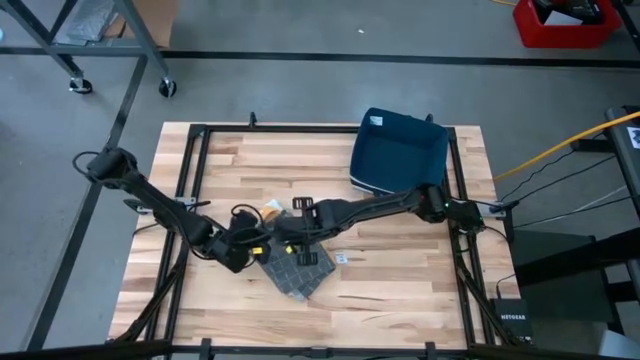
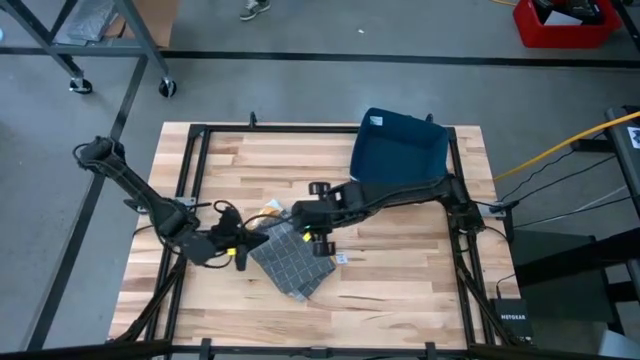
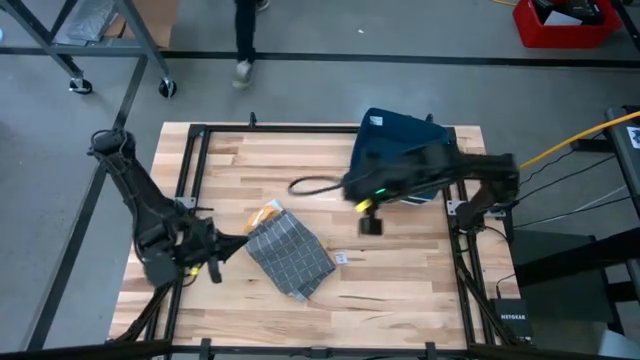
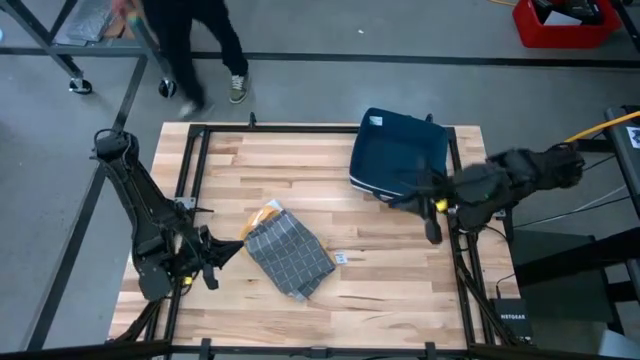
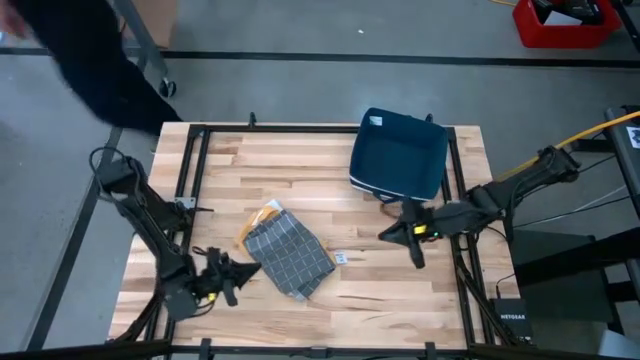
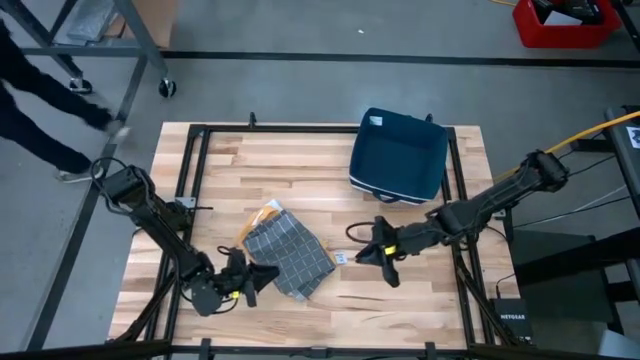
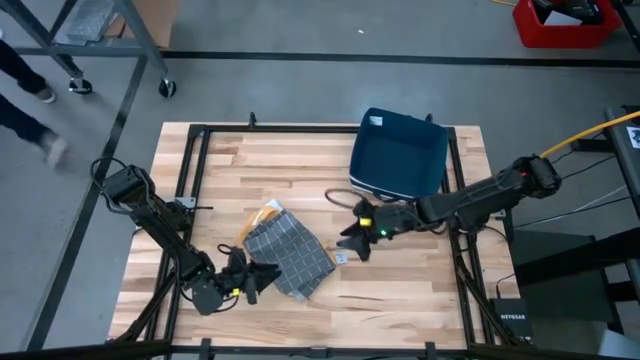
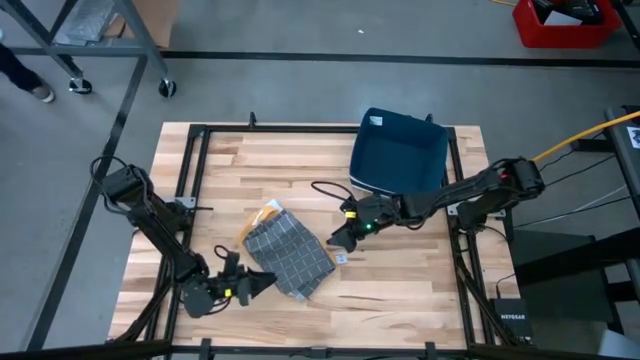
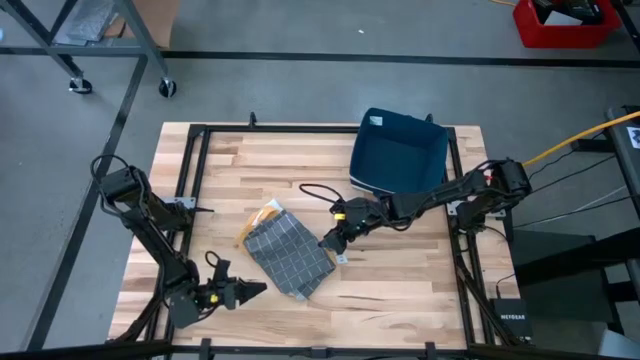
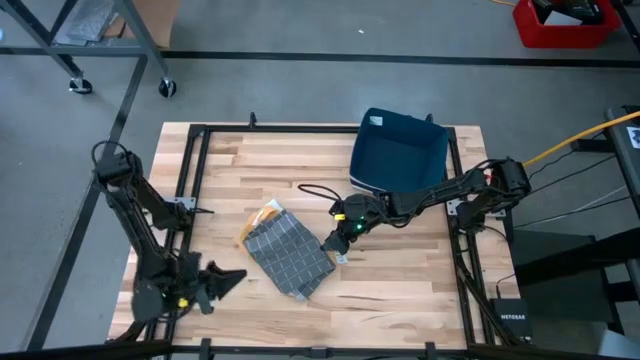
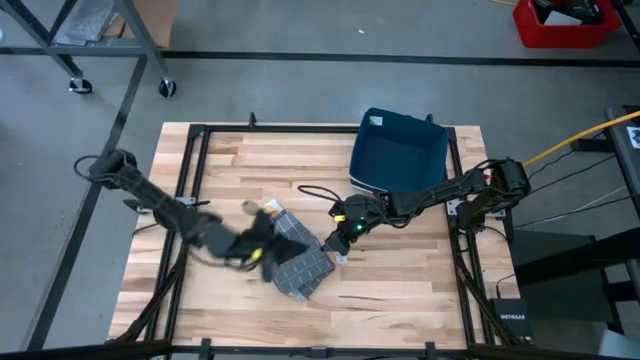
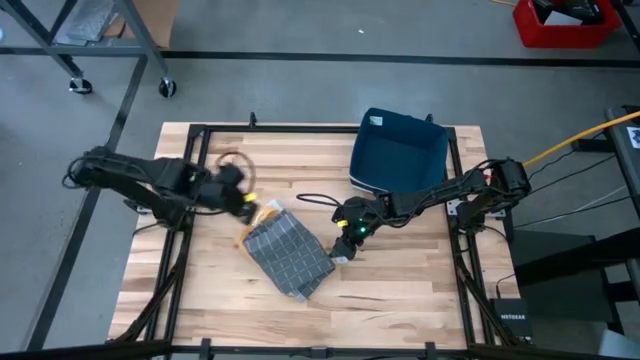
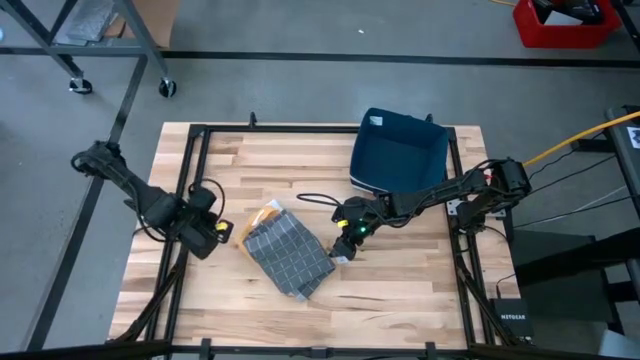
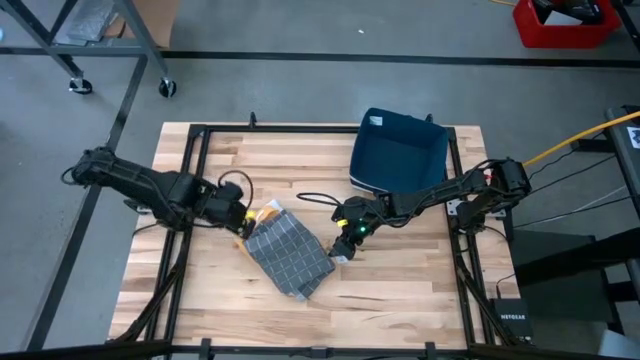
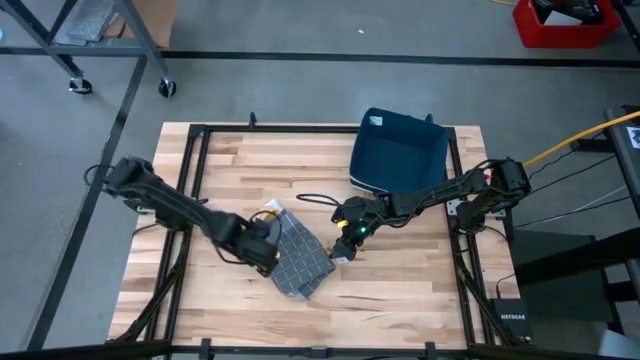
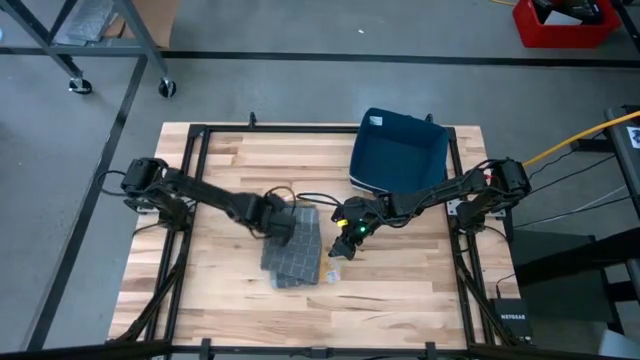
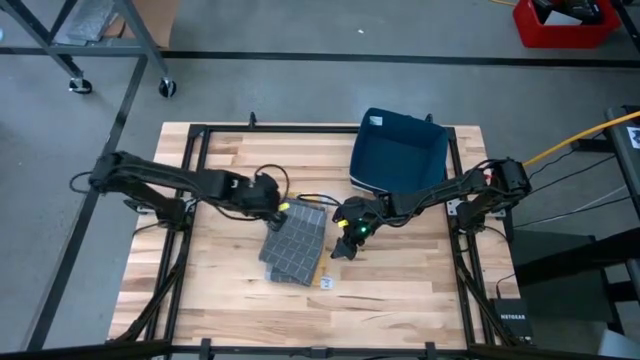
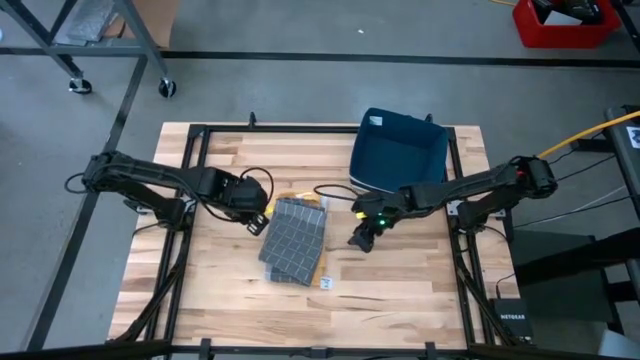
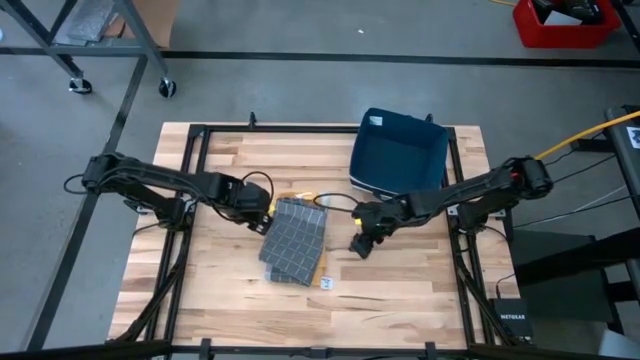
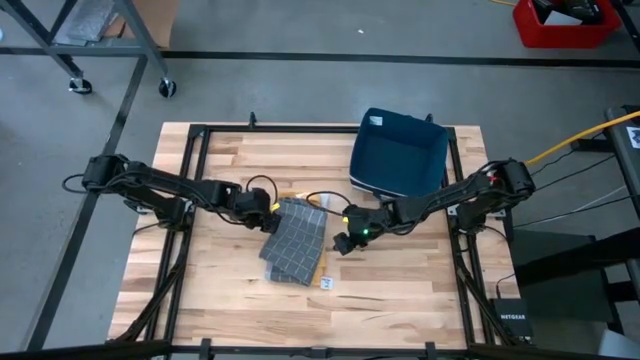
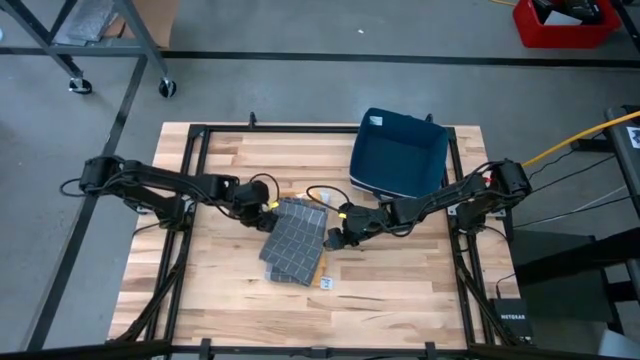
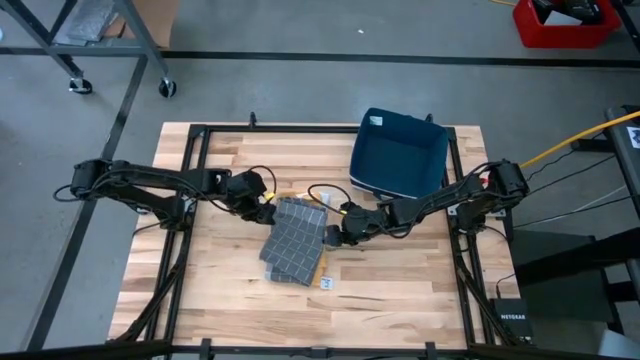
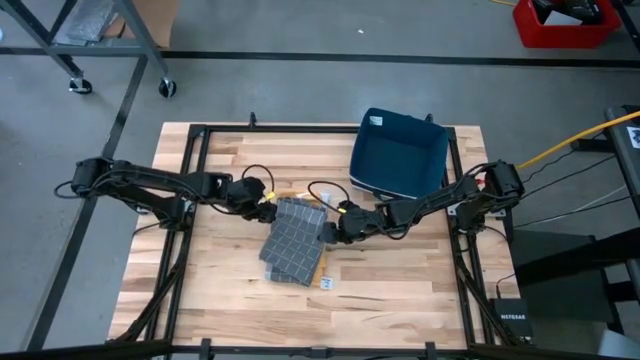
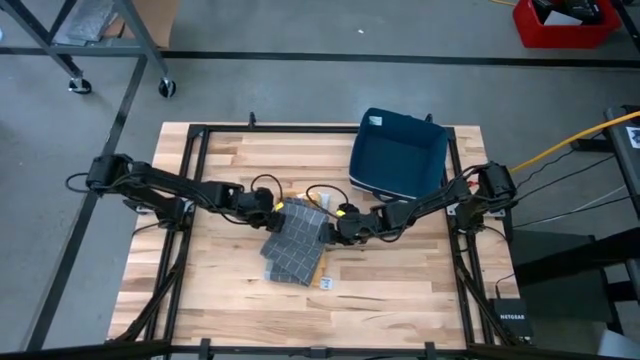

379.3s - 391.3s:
Task: Fold towel
Put the stacked and folded towels into the blue laundry bin

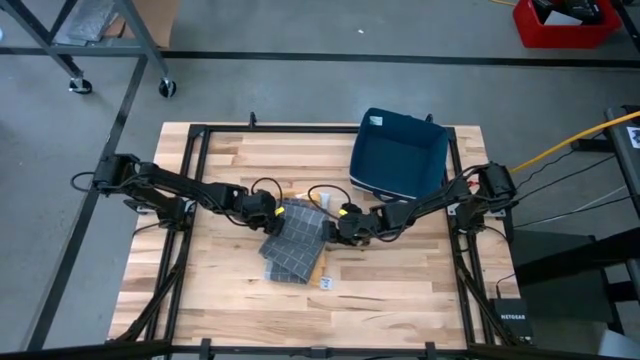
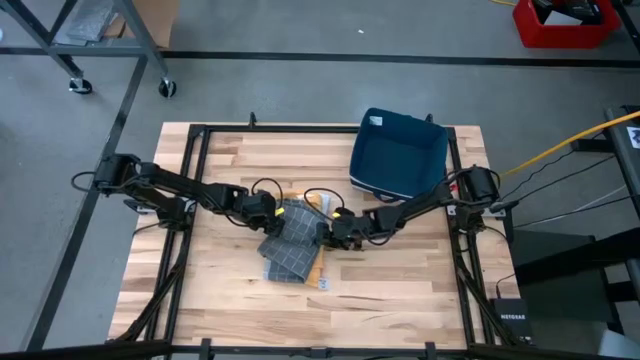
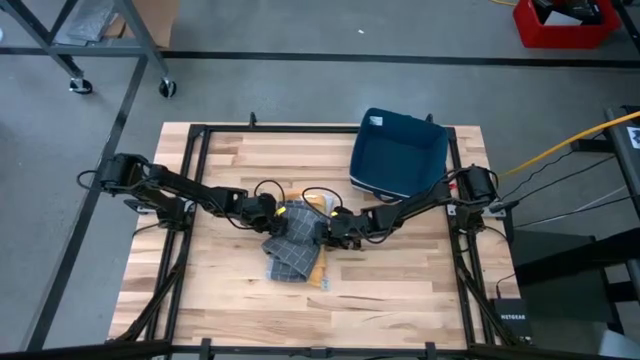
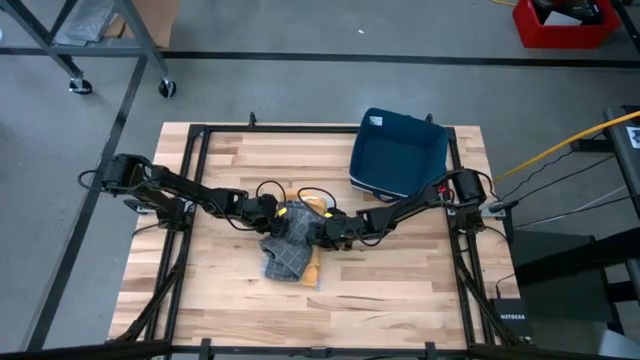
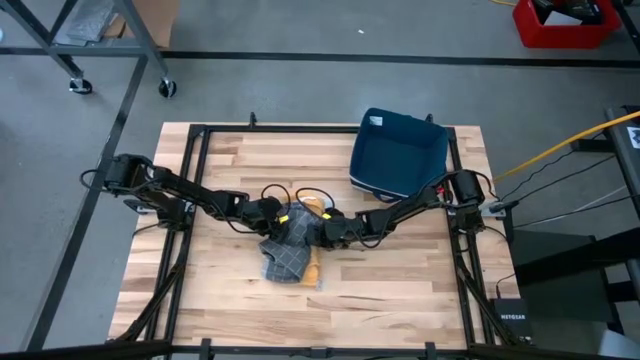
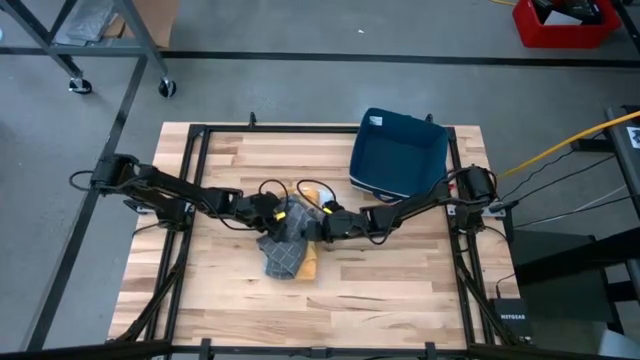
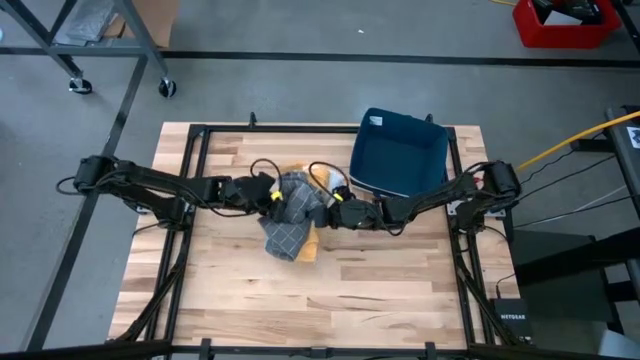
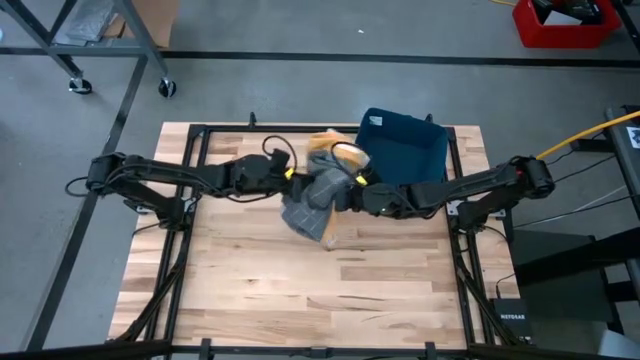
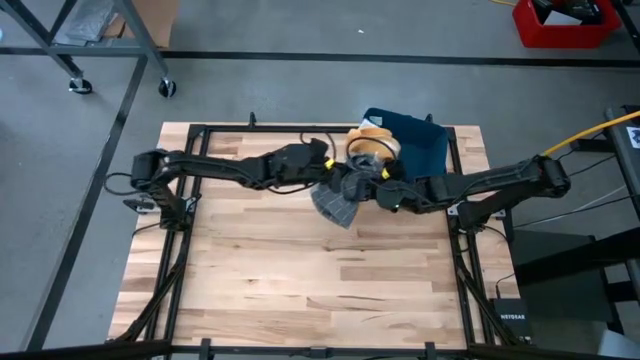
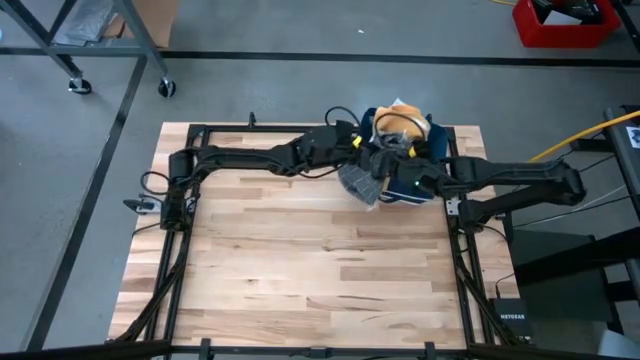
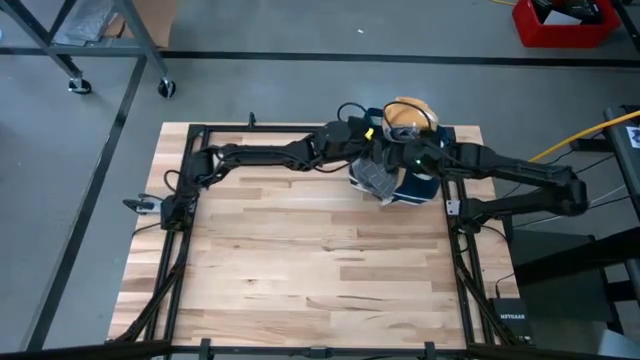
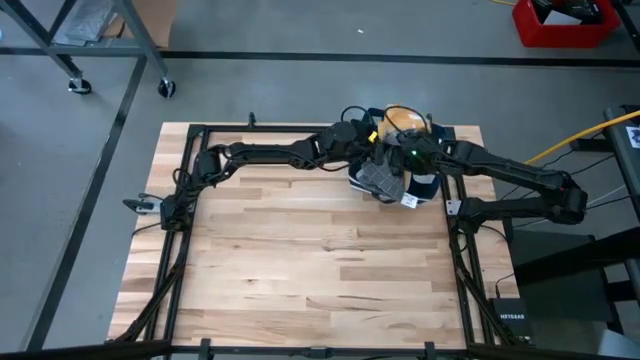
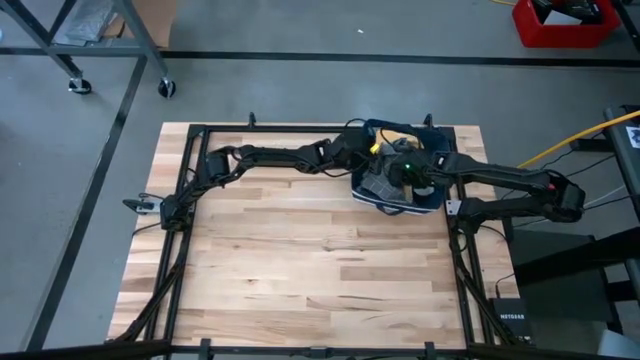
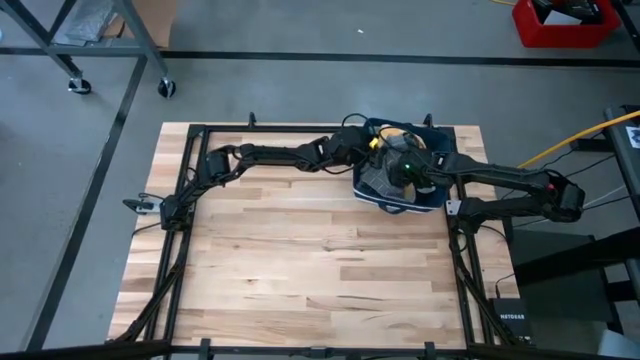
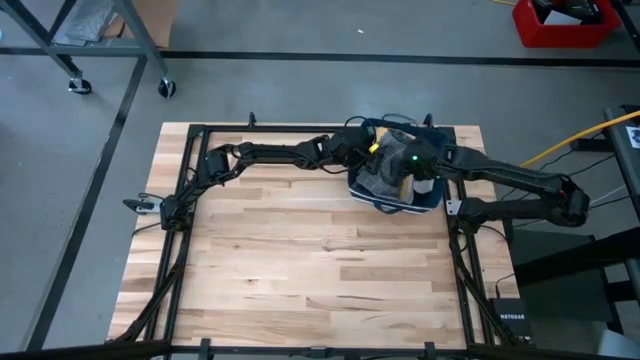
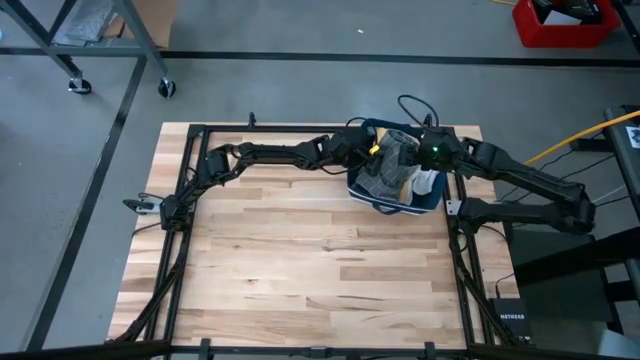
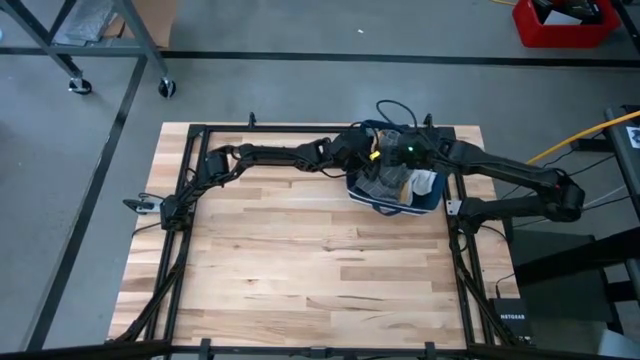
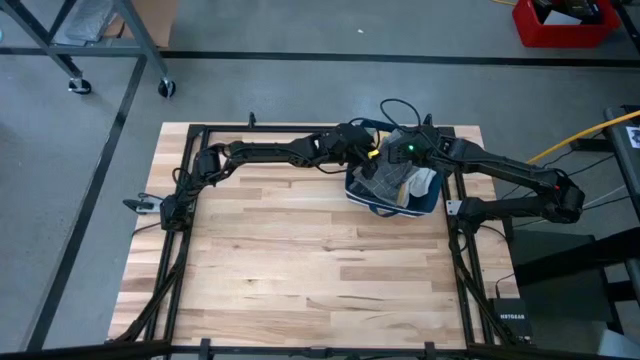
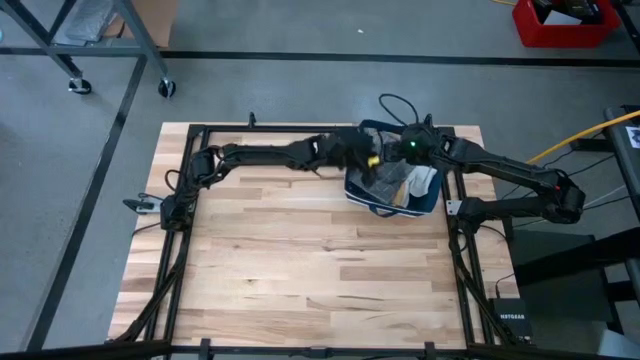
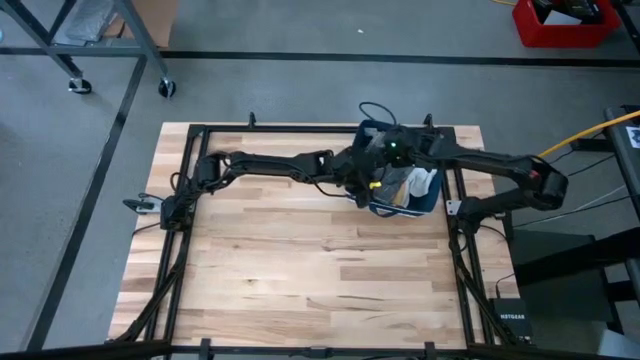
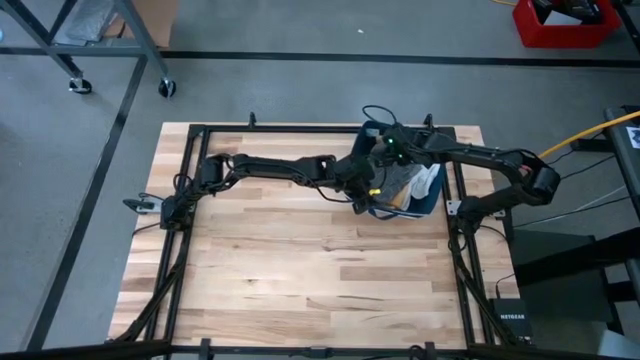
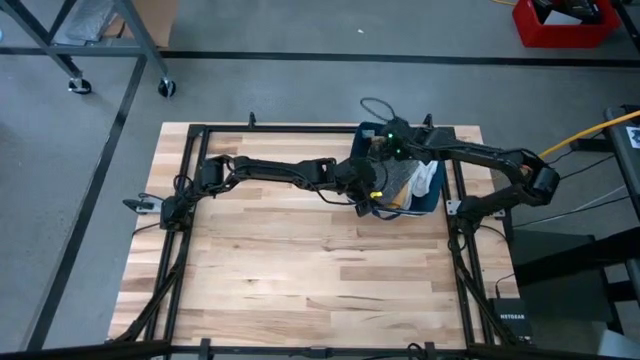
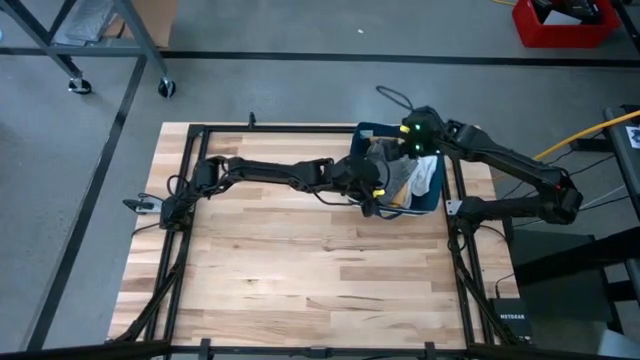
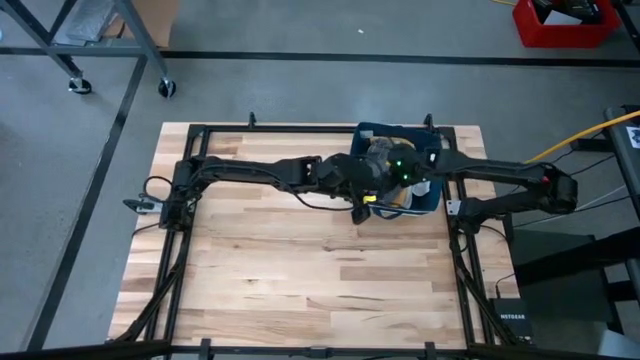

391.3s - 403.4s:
Put the stacked and folded towels into the blue laundry bin
